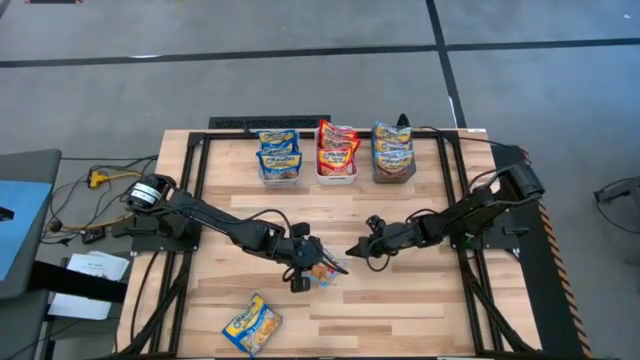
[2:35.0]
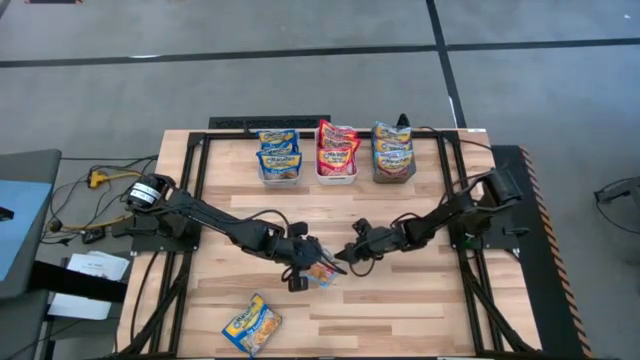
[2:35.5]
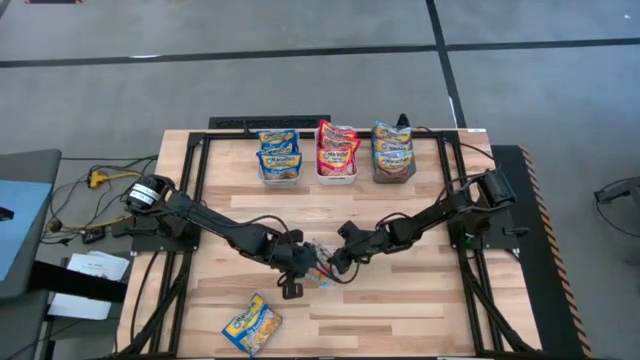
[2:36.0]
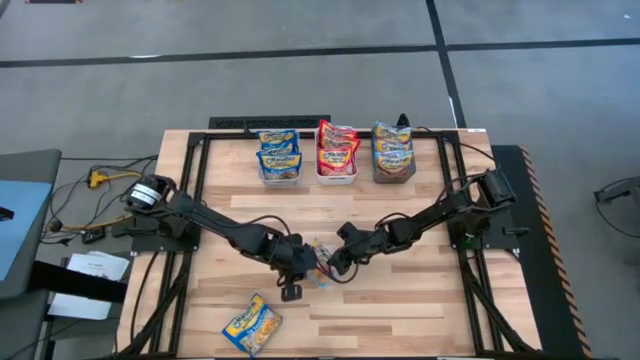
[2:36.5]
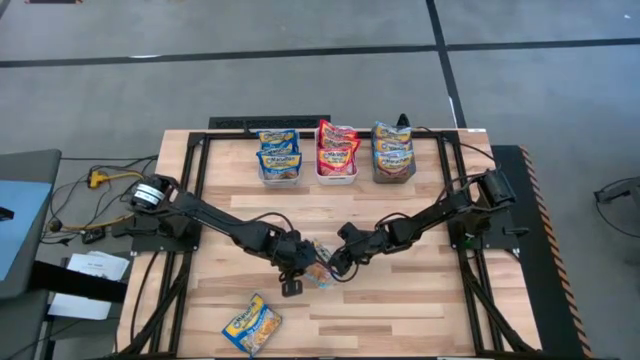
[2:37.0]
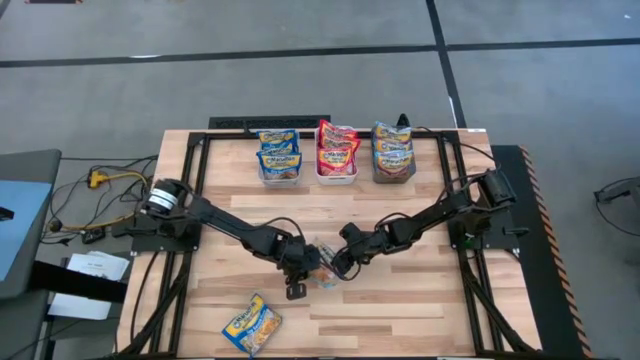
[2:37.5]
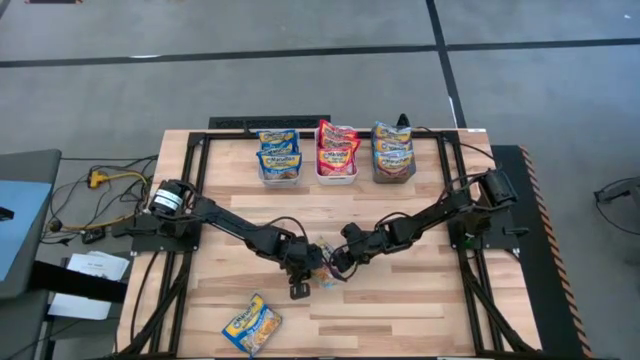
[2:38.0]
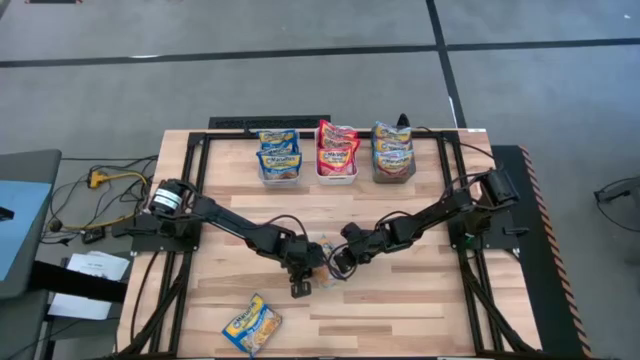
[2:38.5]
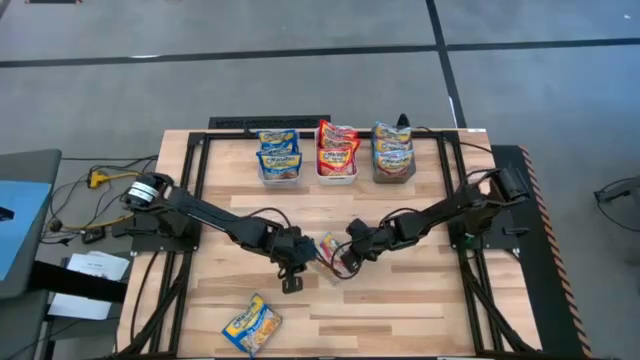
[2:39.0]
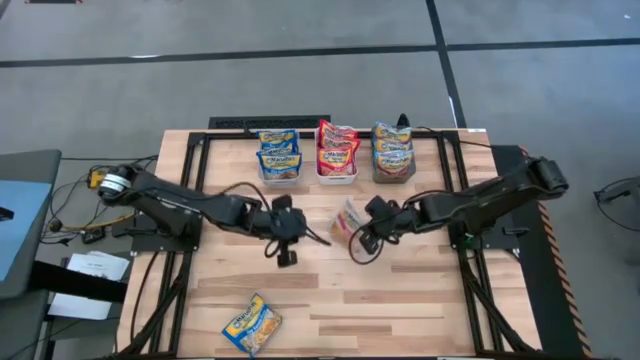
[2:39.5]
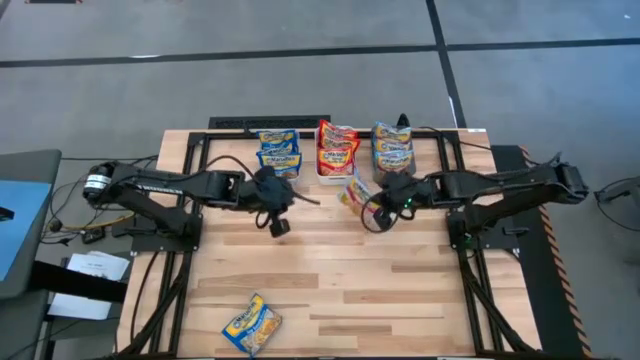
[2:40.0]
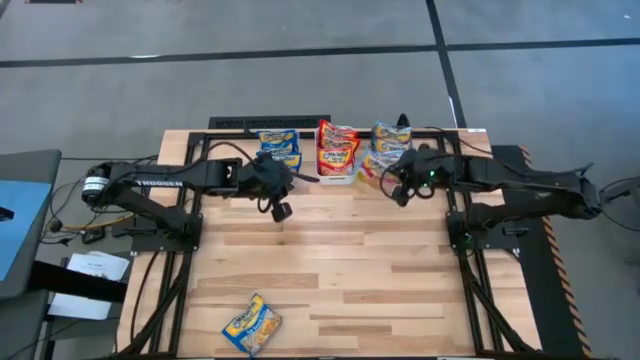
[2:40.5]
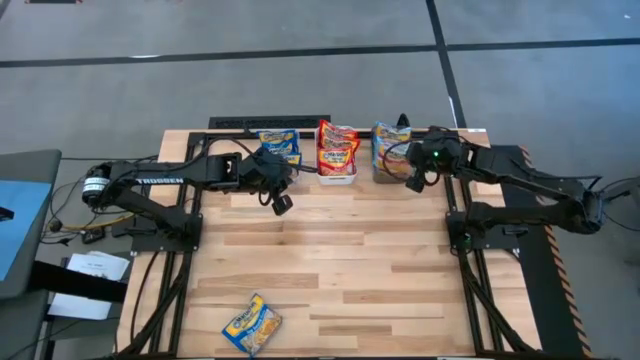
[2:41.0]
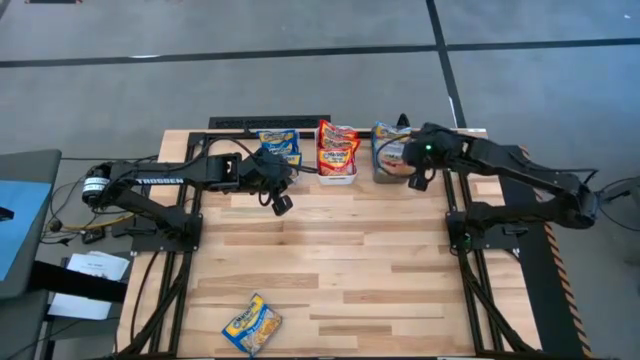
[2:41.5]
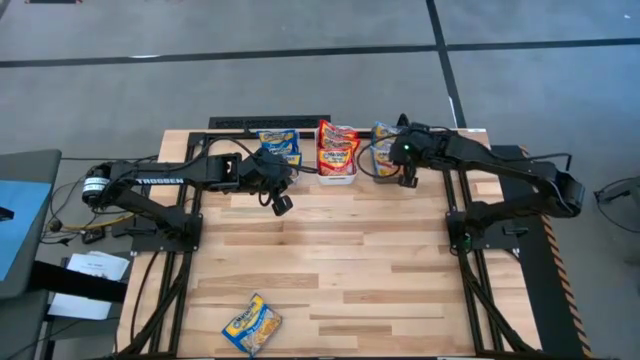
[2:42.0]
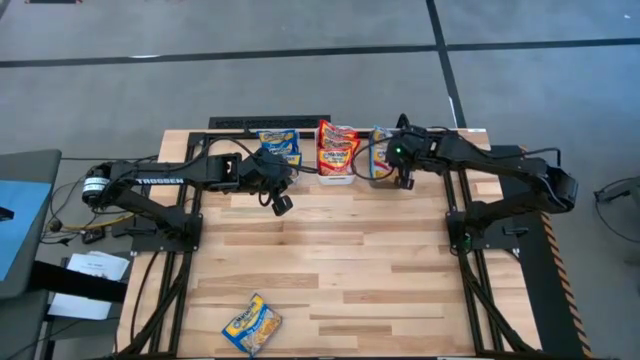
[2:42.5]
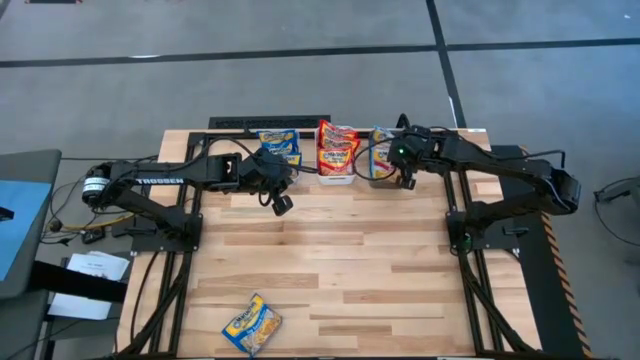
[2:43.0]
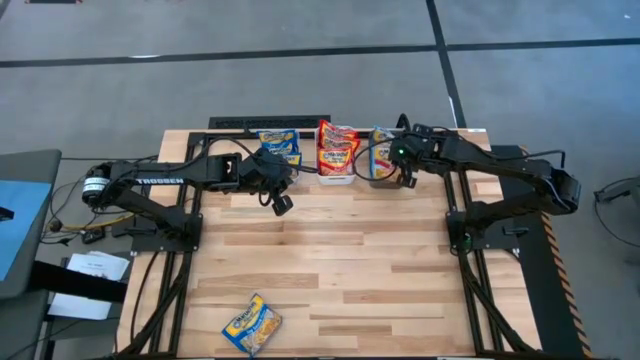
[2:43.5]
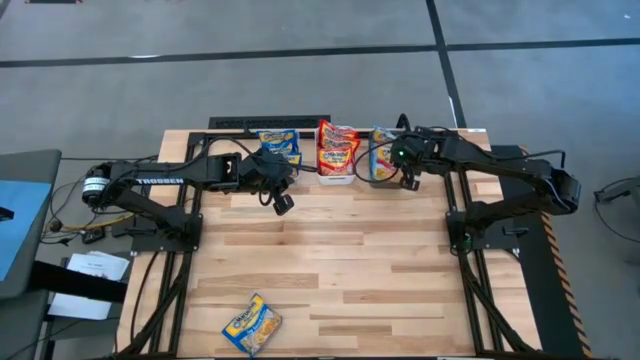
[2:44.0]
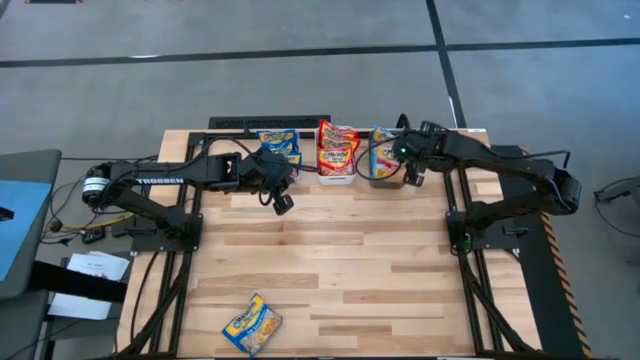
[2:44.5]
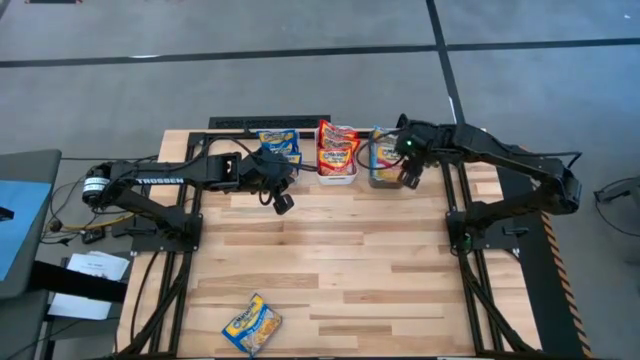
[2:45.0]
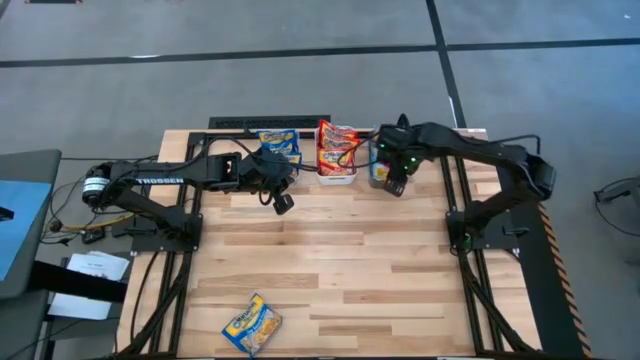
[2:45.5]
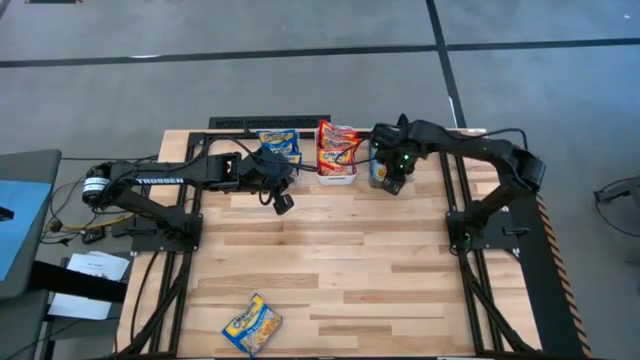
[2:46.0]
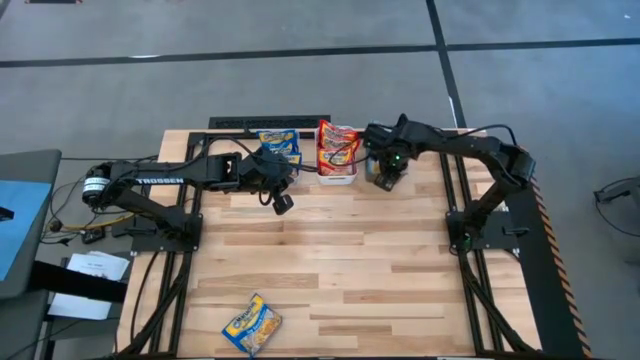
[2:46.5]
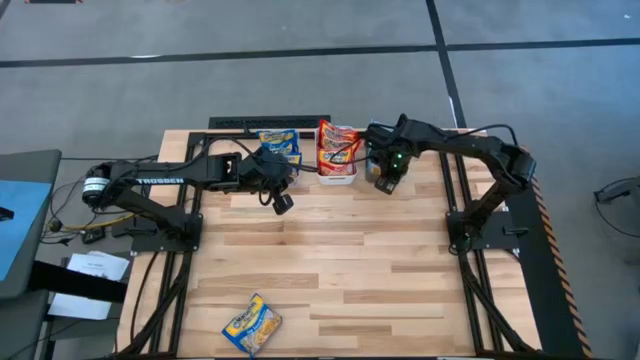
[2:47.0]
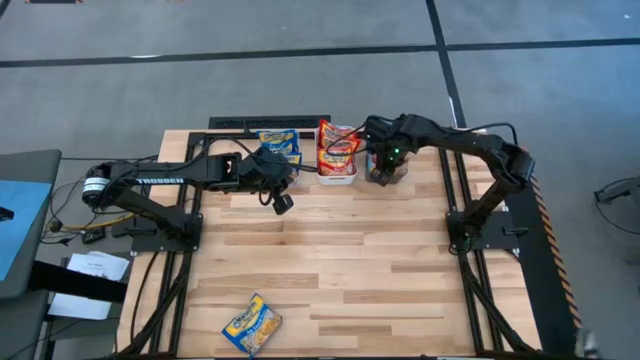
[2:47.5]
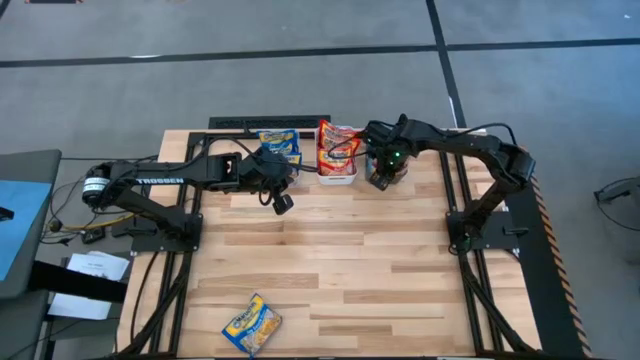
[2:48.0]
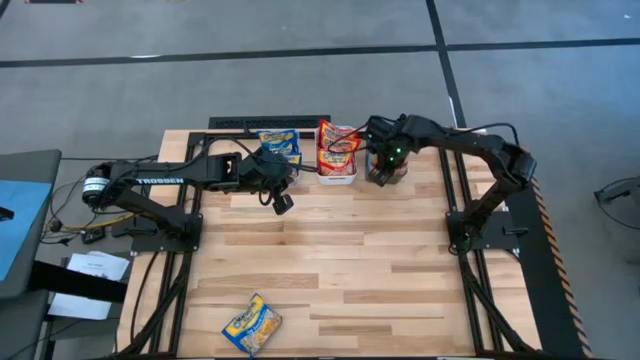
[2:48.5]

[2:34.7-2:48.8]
Task: Sort Maruchan noodles
Put the light blue noodle pack into the black bin

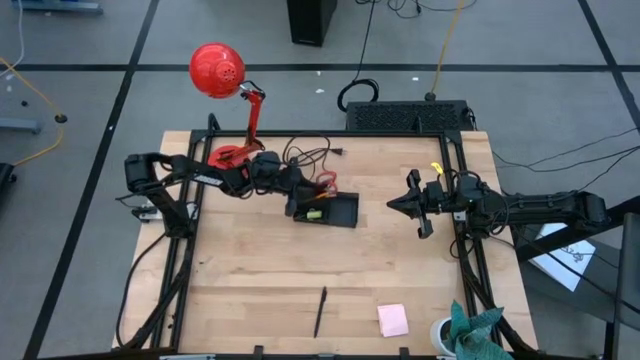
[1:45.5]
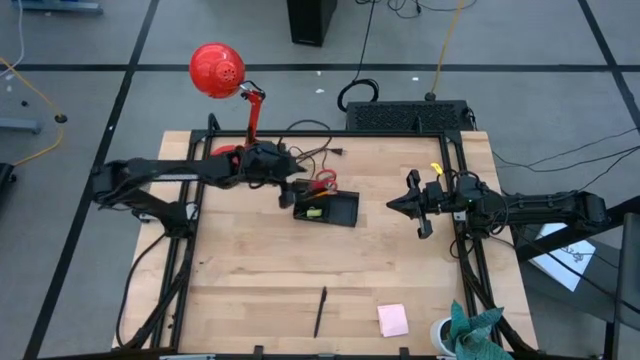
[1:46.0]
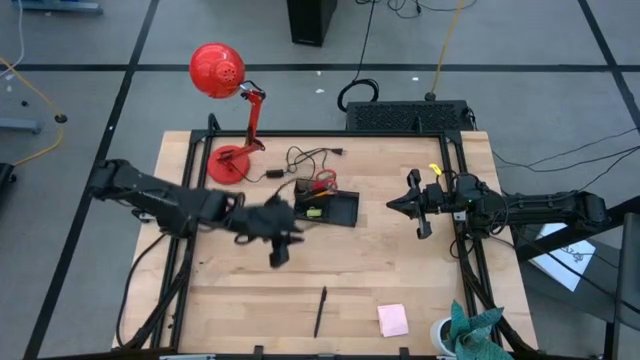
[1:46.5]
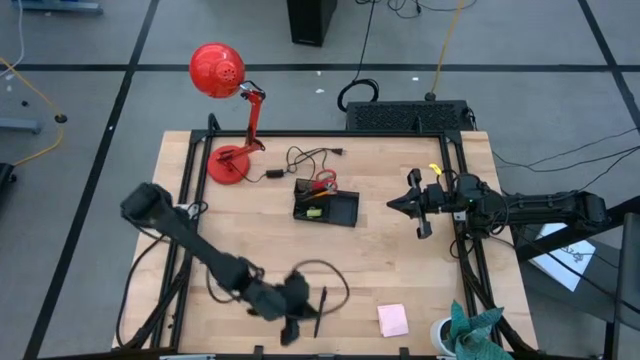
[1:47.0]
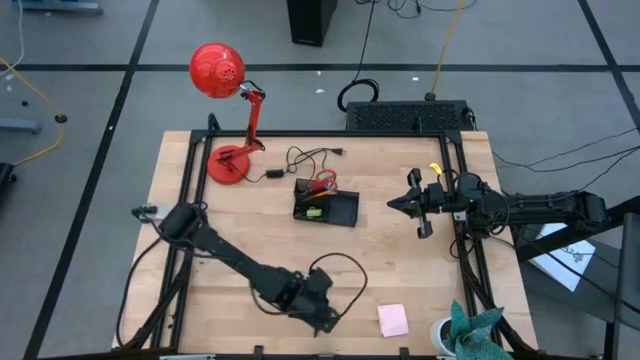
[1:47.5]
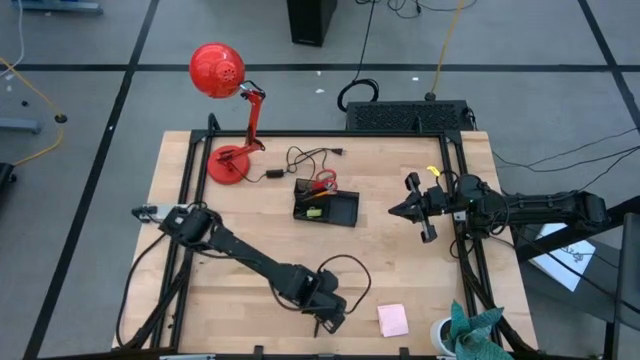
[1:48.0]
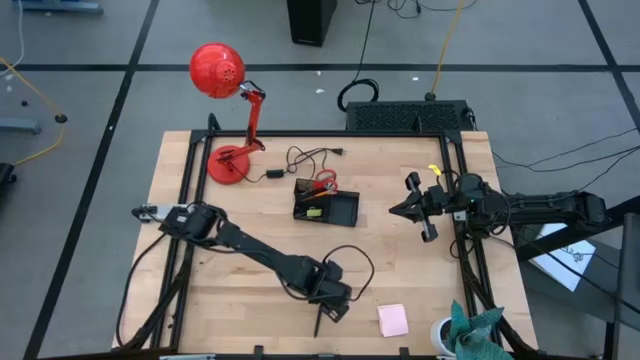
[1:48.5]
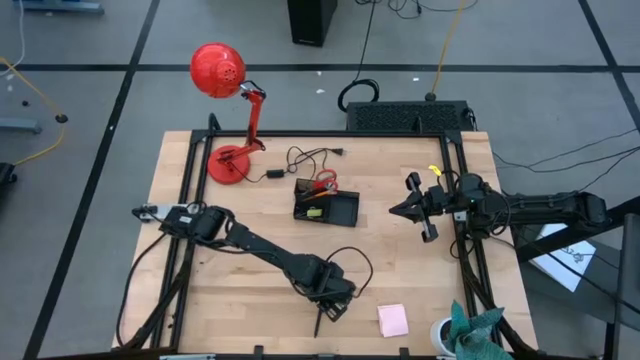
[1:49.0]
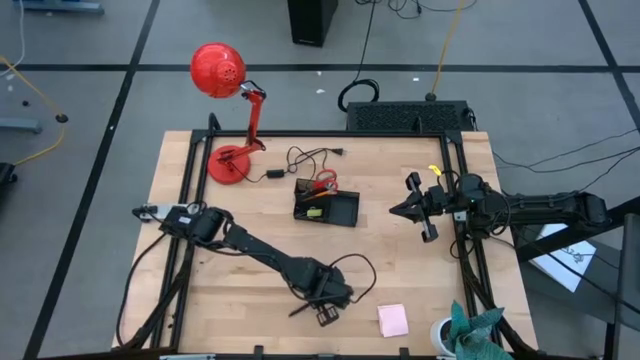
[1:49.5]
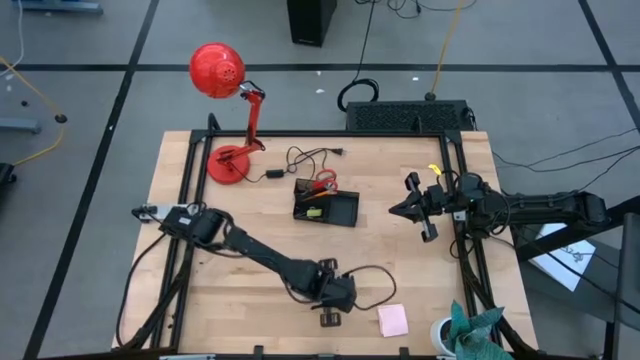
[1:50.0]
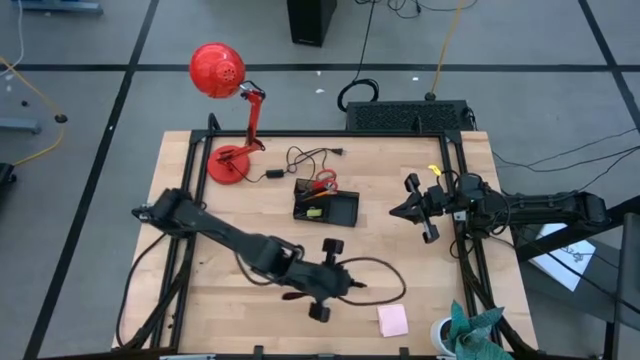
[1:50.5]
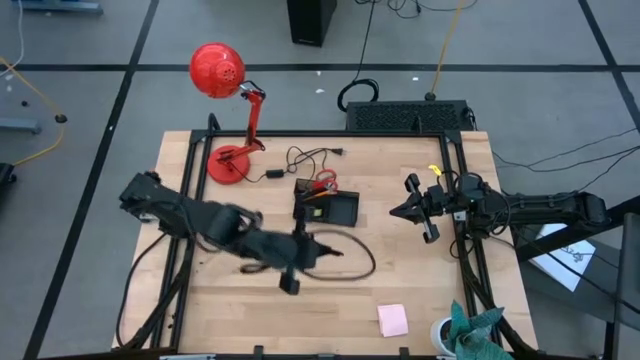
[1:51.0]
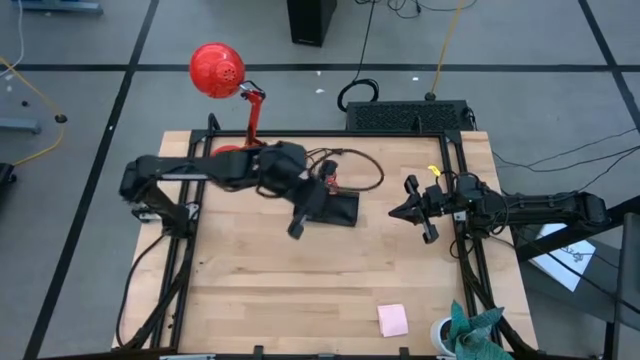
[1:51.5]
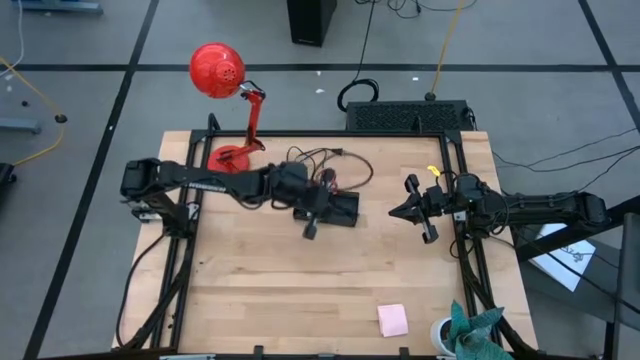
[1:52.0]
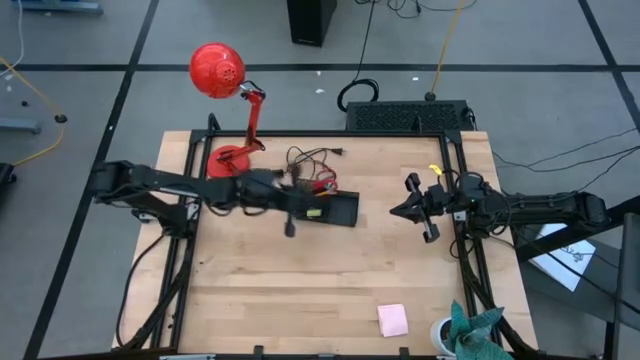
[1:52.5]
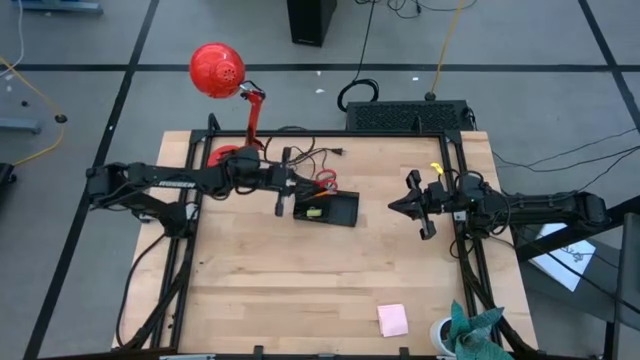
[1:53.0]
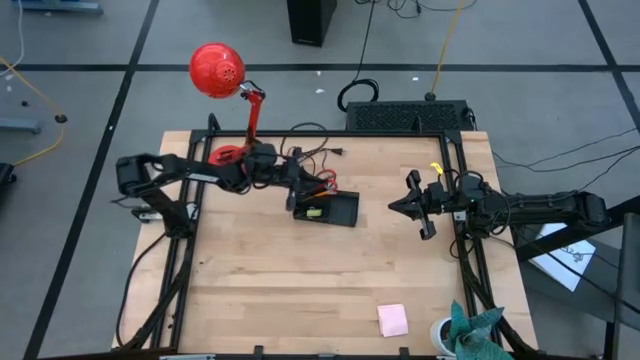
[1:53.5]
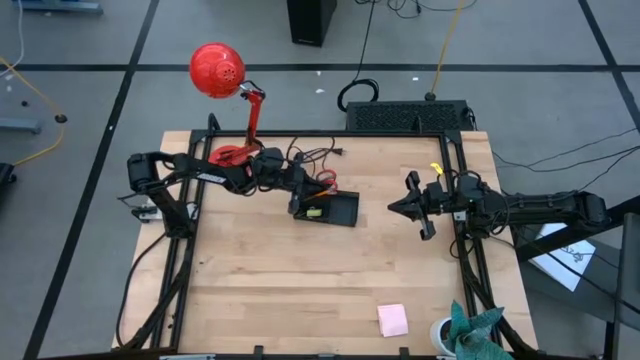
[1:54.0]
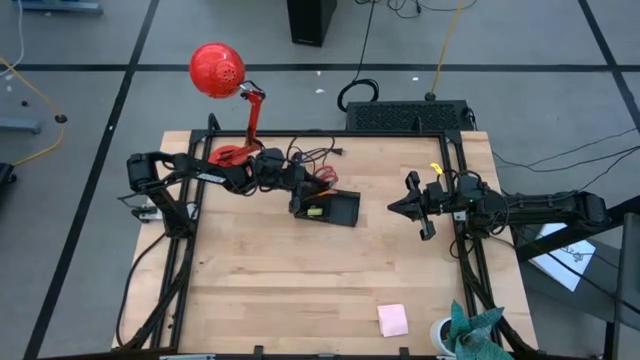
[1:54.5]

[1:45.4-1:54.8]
Task: Pick and place office supplies into organizer
Put the black ballpen into the black desk organizer
